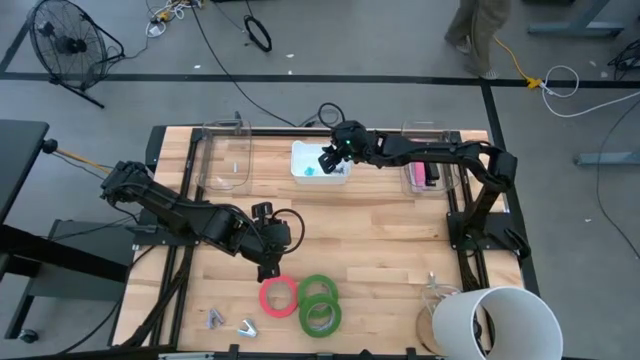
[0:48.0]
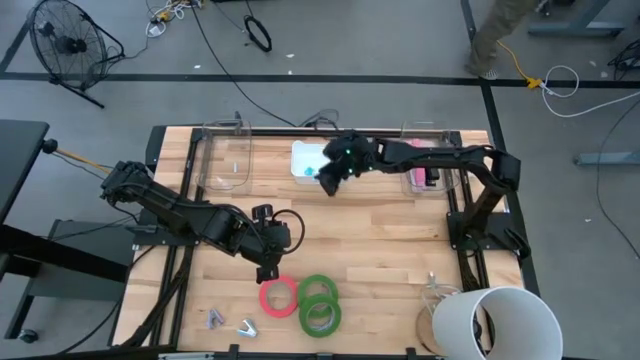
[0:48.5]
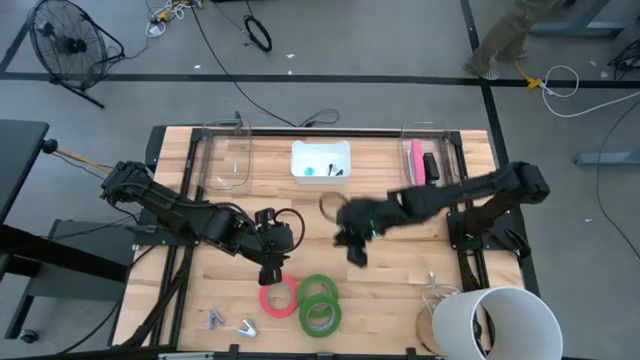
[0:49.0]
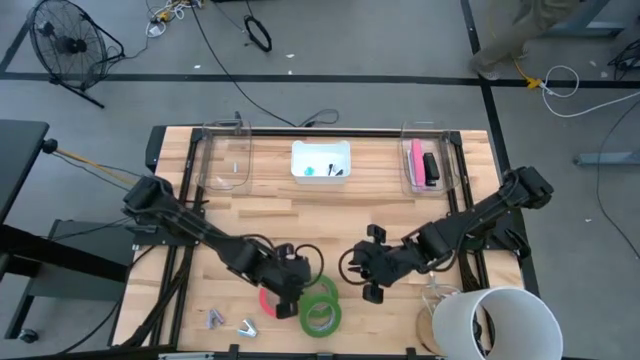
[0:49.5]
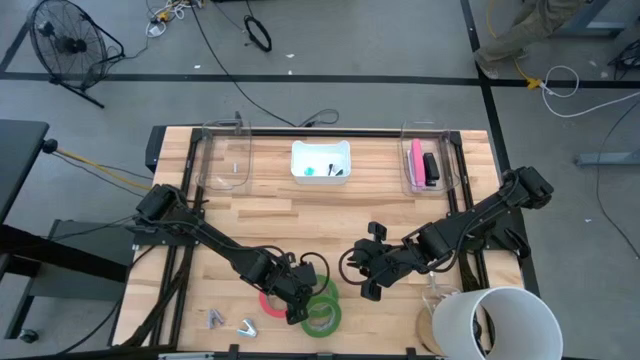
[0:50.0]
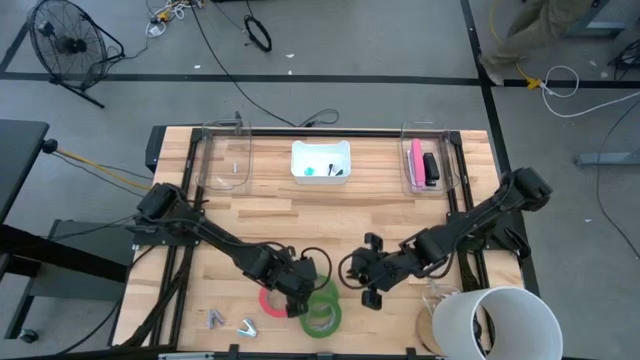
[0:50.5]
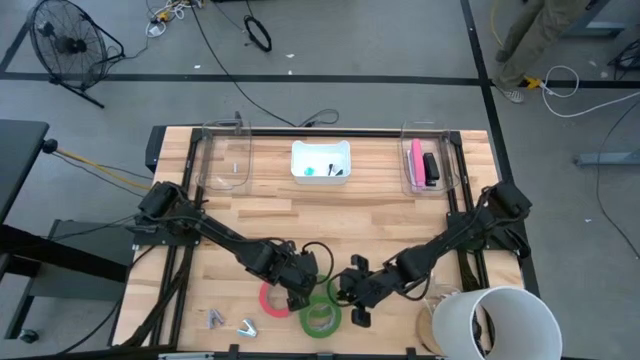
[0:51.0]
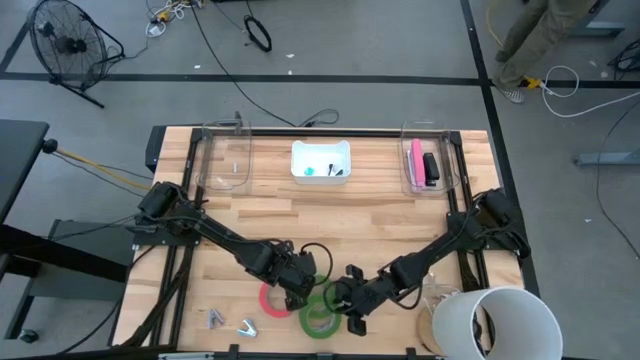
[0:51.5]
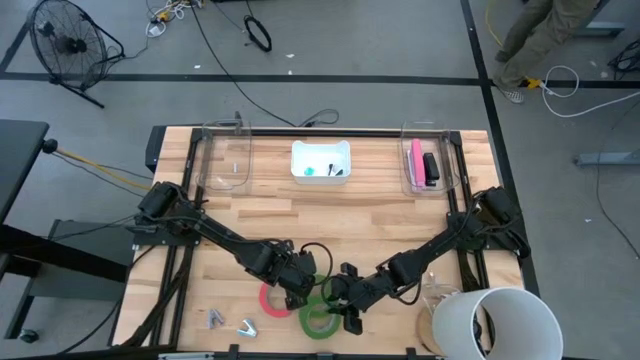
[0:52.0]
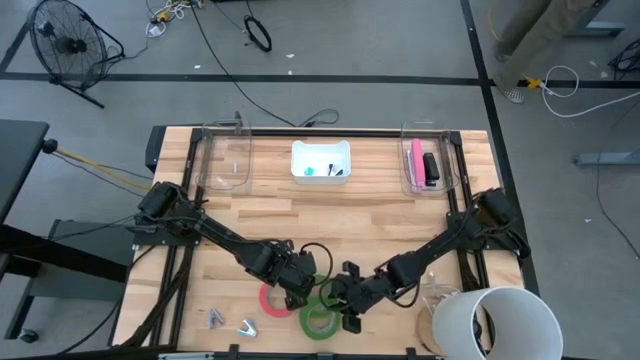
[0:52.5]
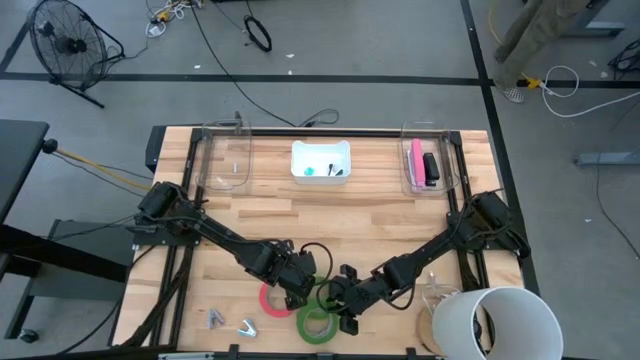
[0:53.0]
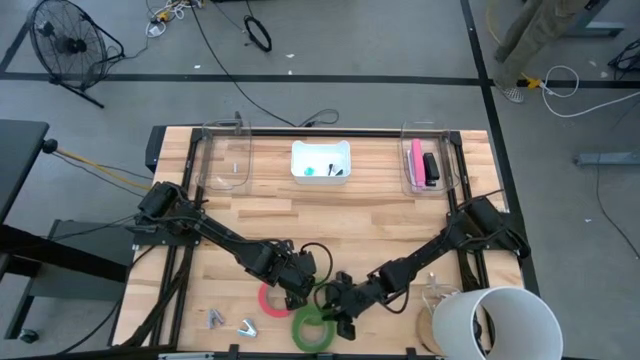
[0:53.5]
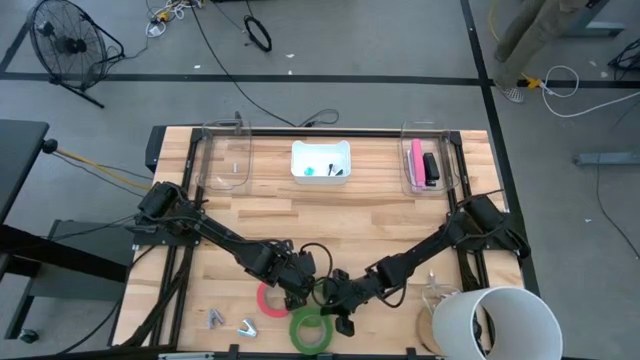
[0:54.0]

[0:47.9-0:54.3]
Task: Pick and place Stapler, Stapler remover, tape
Put the green tape into the left transparent bin

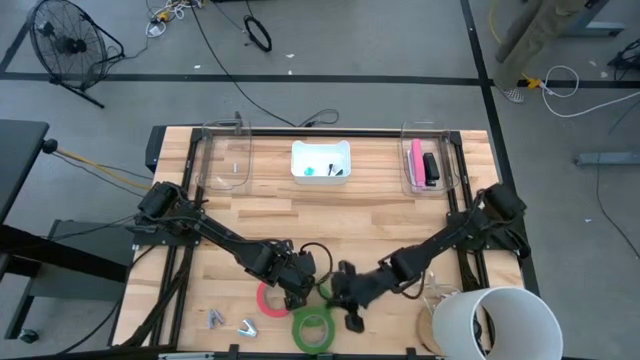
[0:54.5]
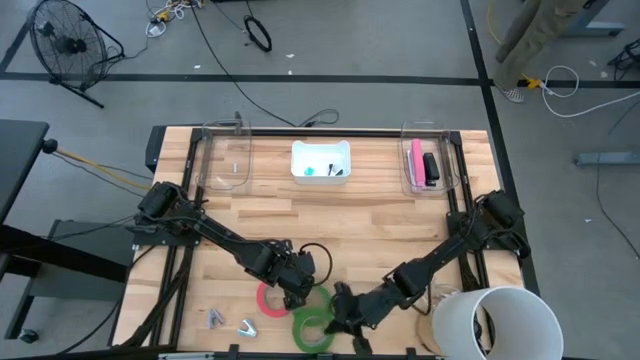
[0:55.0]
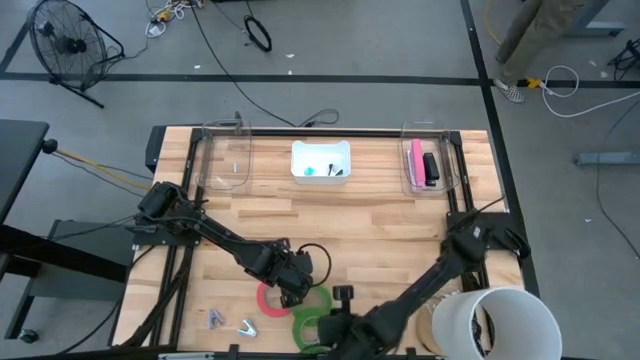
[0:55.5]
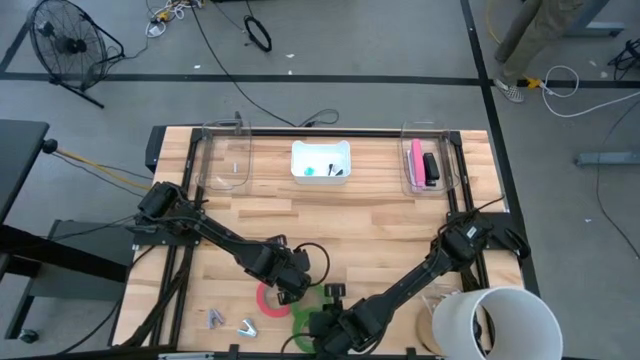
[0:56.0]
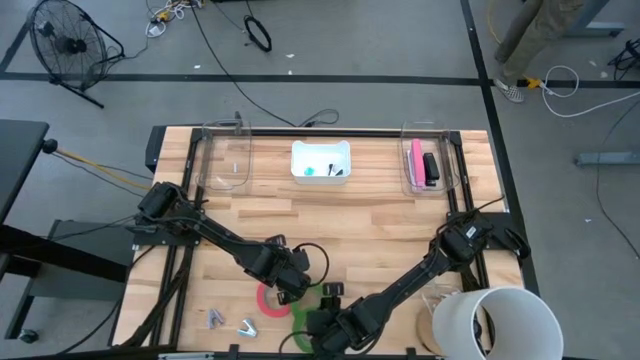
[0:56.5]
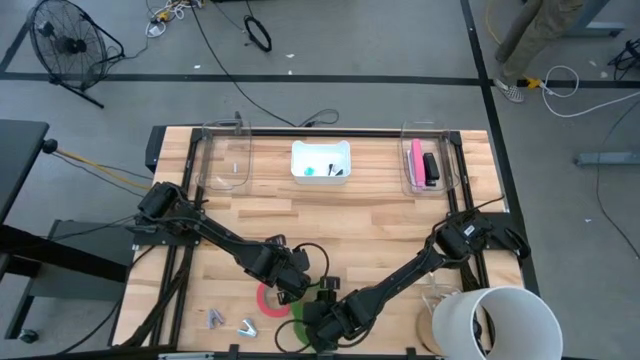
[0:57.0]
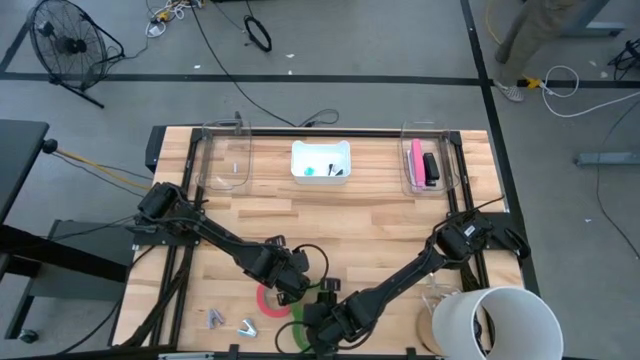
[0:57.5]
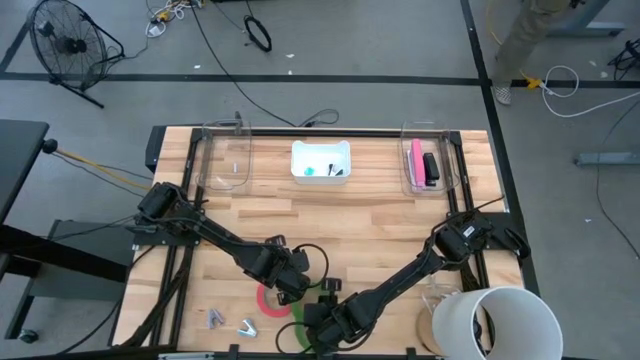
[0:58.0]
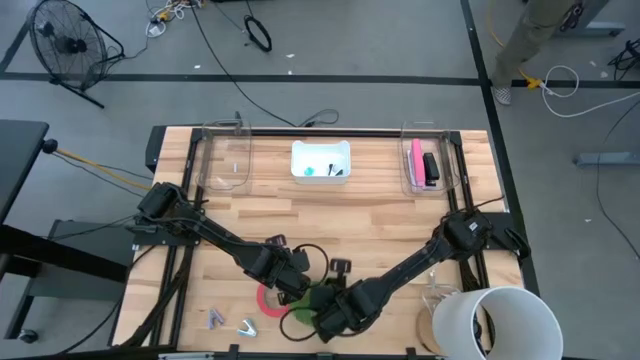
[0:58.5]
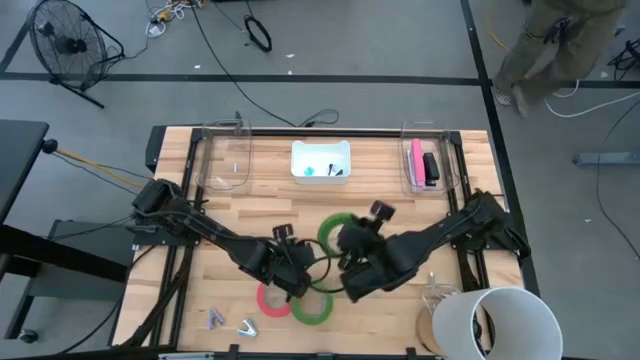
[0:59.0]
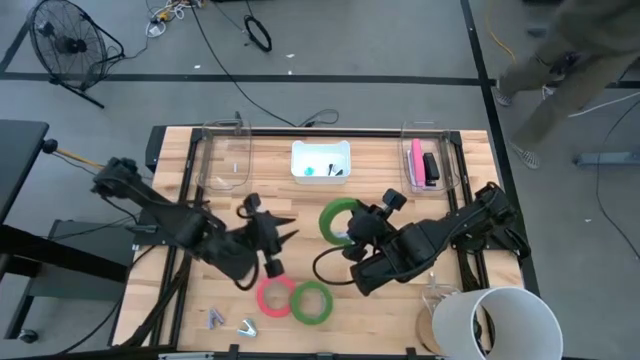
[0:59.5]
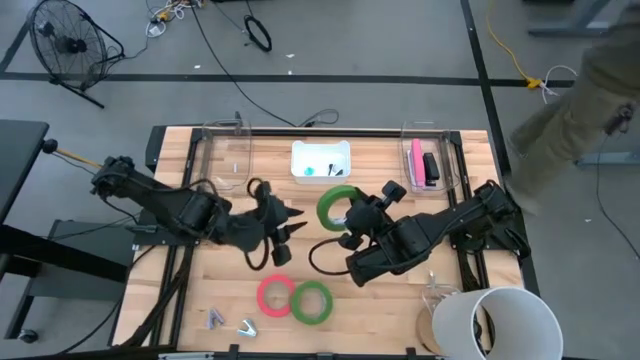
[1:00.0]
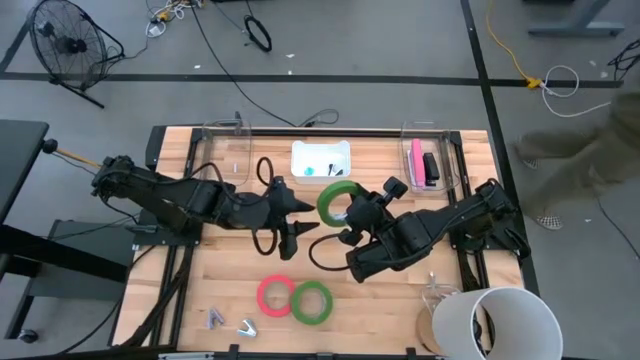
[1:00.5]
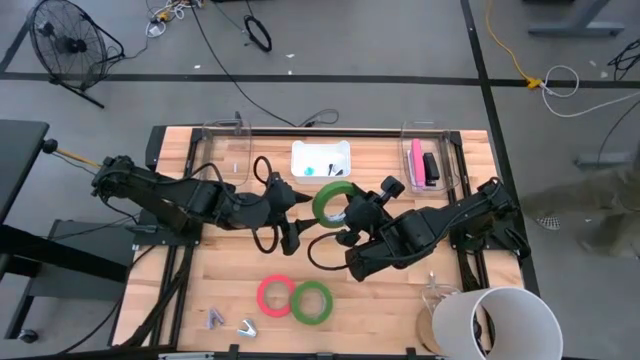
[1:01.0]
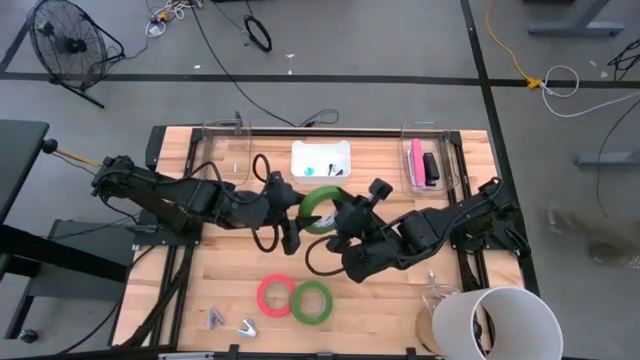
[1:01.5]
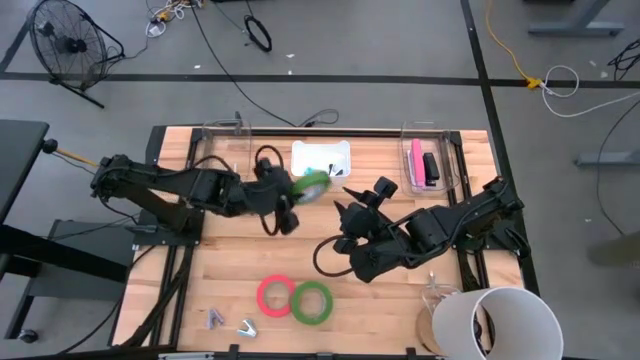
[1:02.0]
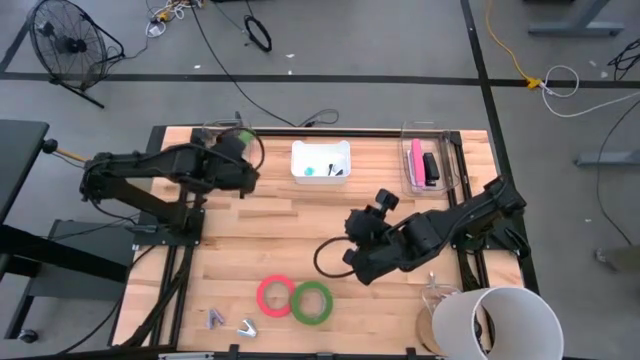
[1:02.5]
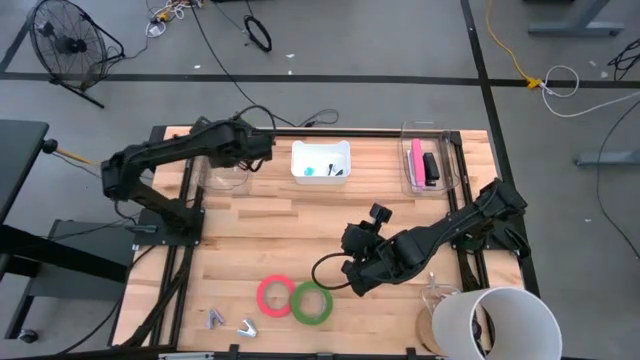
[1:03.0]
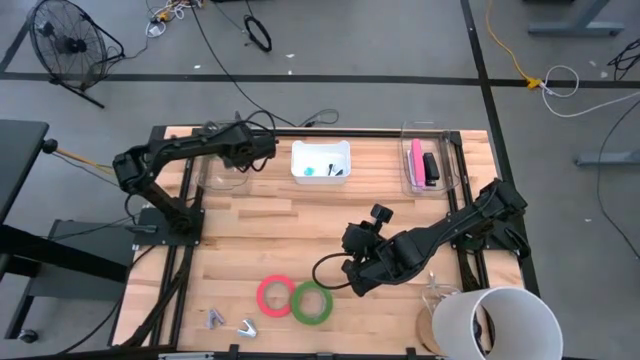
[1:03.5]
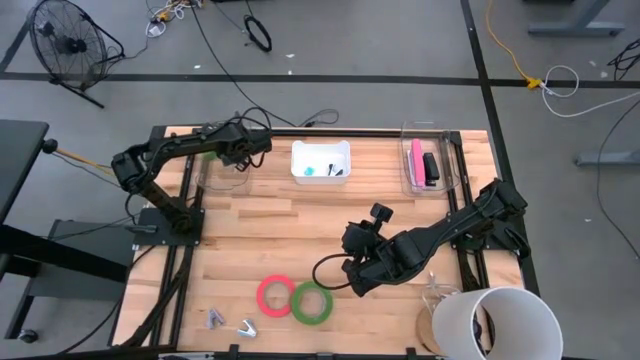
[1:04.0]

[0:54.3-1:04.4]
Put the green tape into the left transparent bin

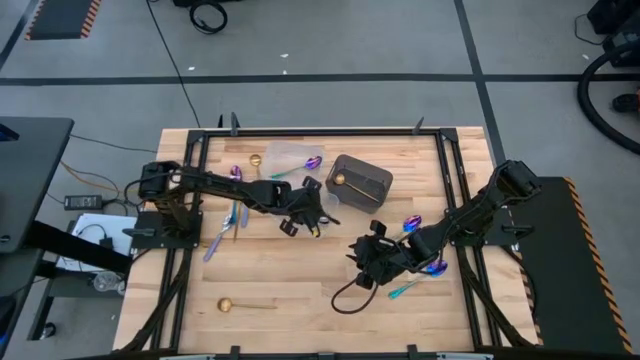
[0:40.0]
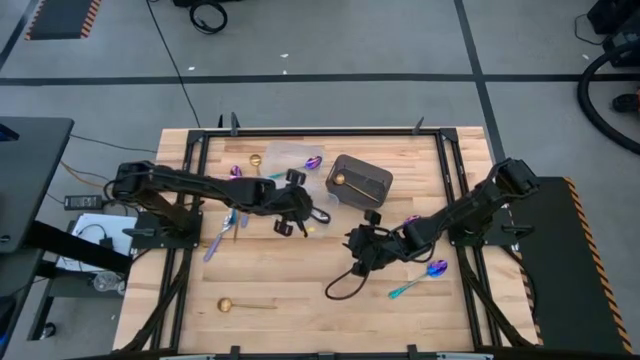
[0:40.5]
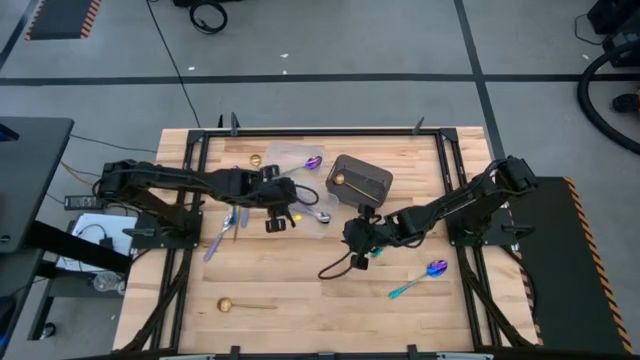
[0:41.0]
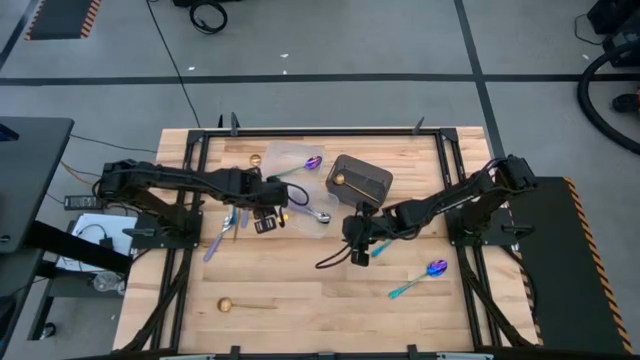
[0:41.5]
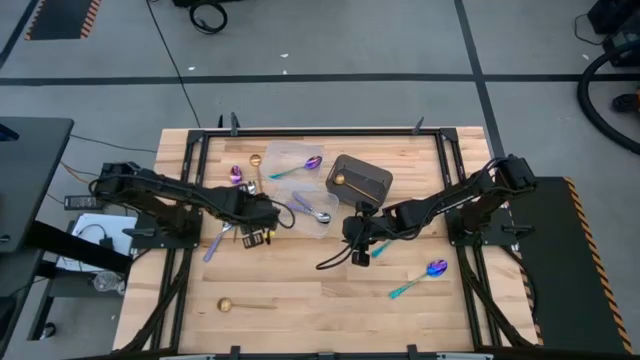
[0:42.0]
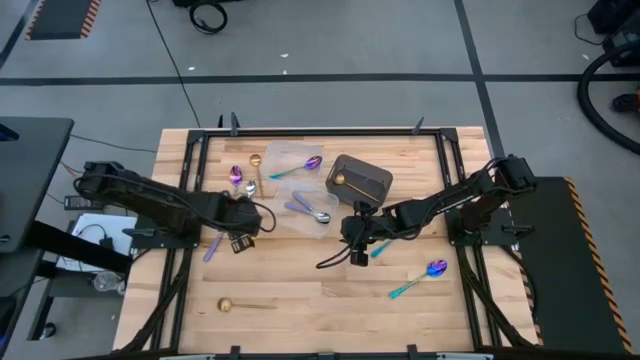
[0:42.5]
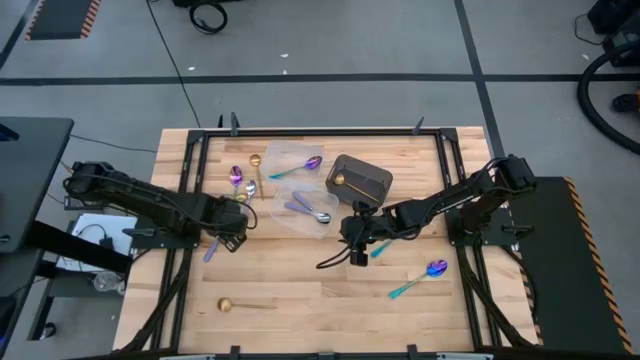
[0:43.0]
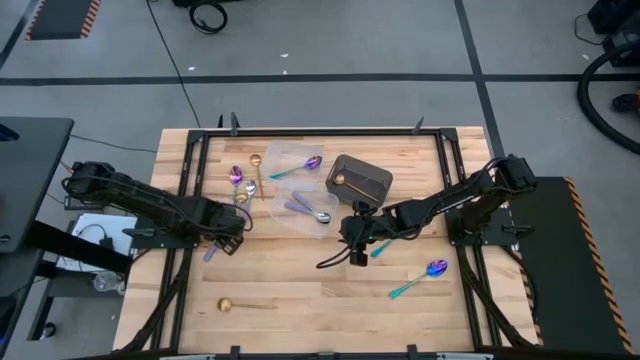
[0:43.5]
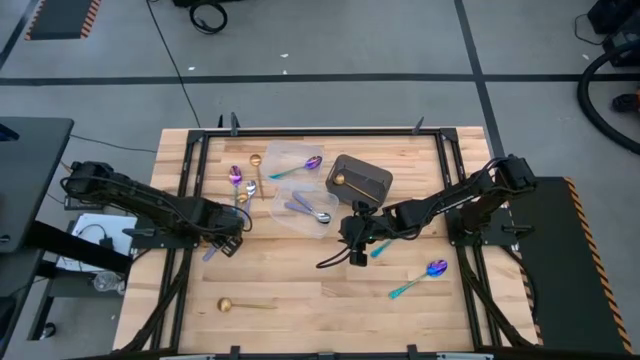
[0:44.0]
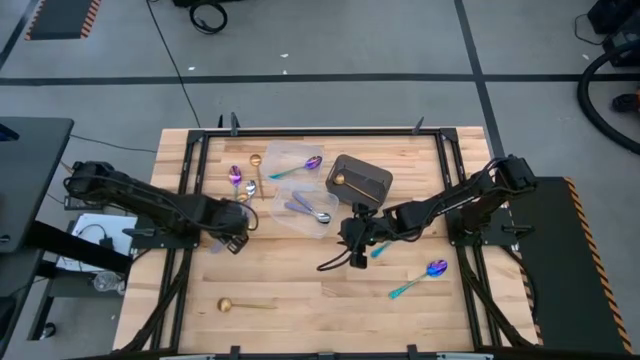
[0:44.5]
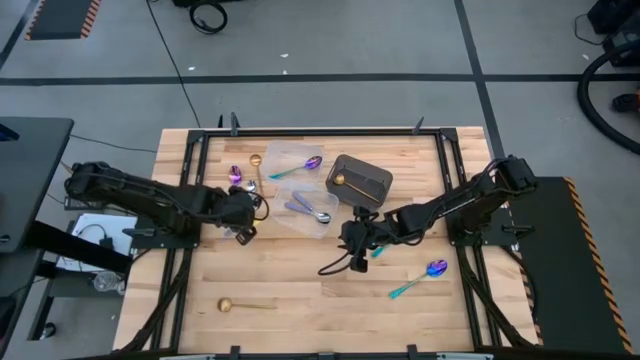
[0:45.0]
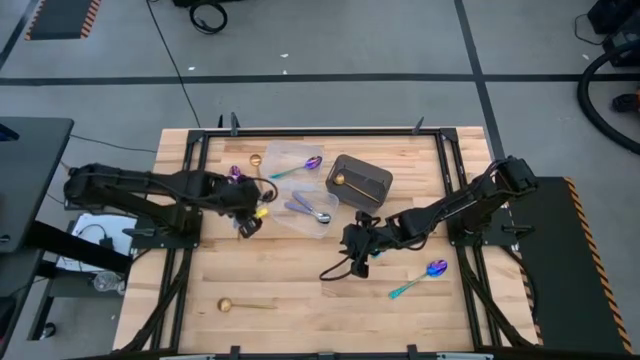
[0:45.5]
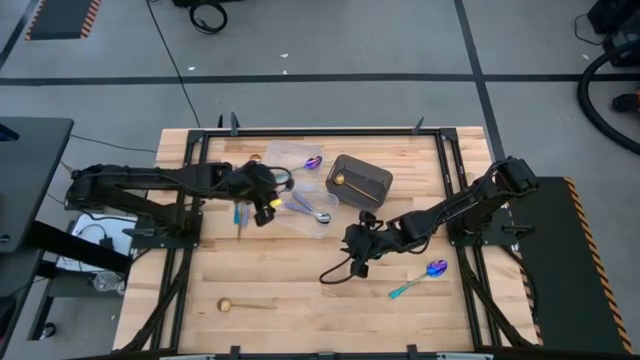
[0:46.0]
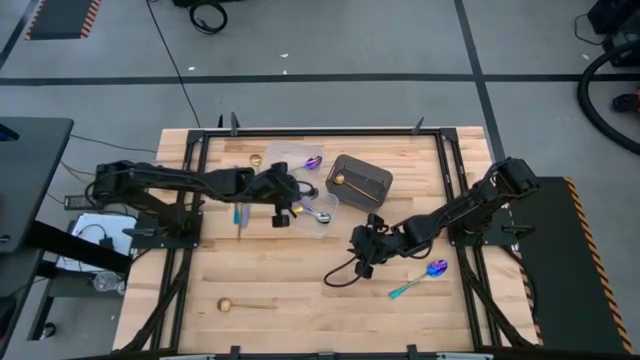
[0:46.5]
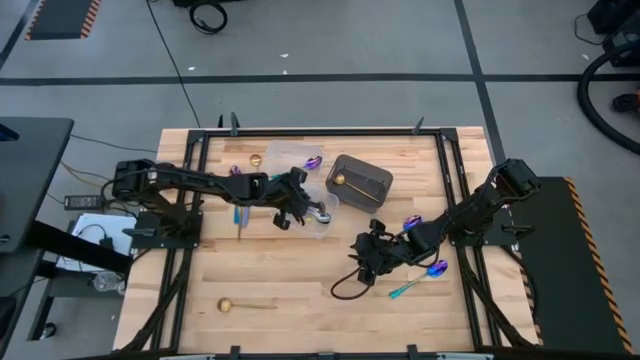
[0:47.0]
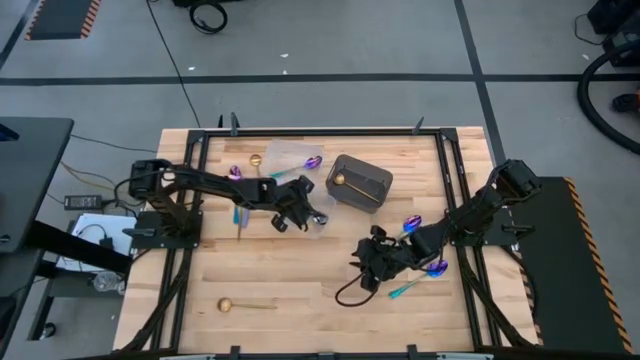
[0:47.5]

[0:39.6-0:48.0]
Task: Sort silverware by color (type)
Put the purple spoon into the bottom transparent bin
